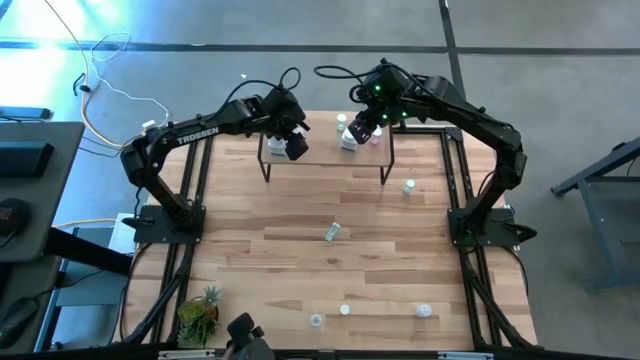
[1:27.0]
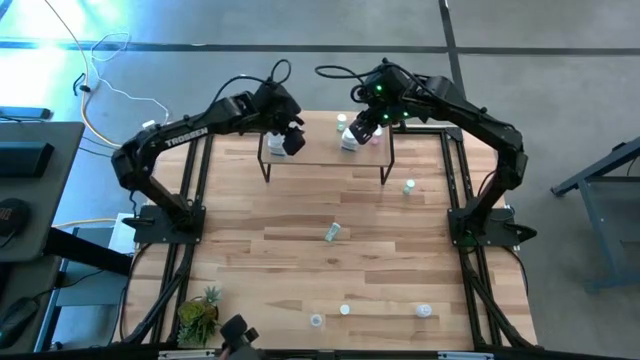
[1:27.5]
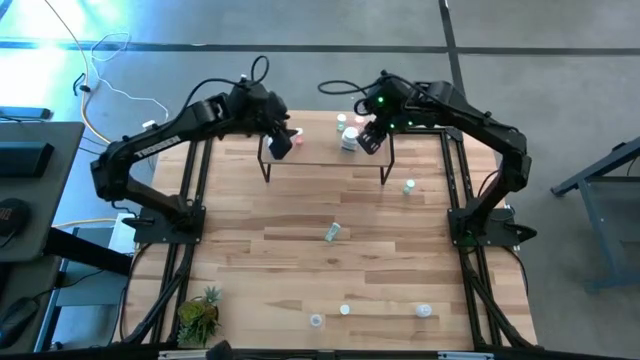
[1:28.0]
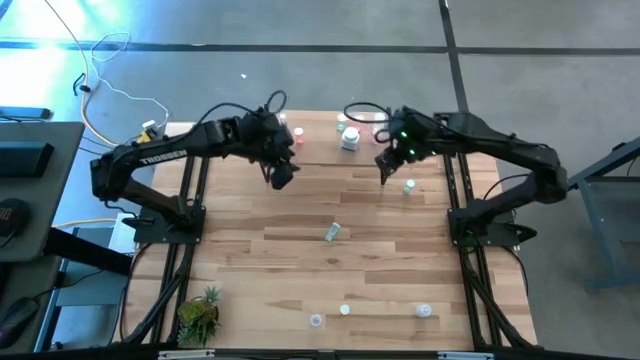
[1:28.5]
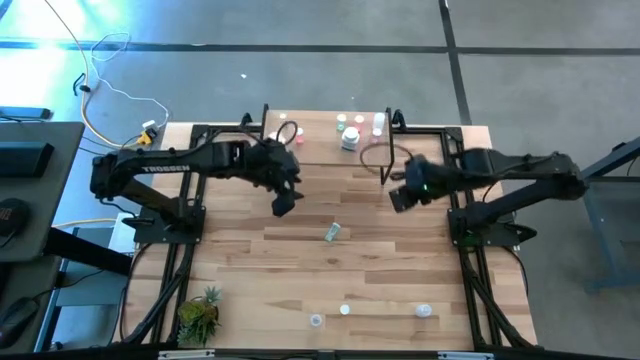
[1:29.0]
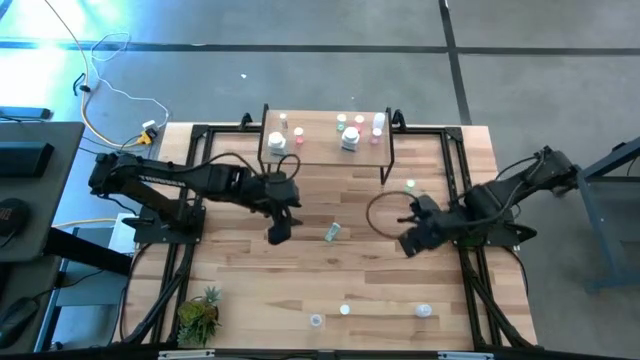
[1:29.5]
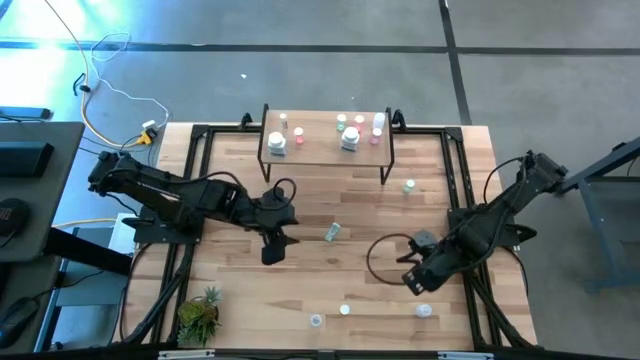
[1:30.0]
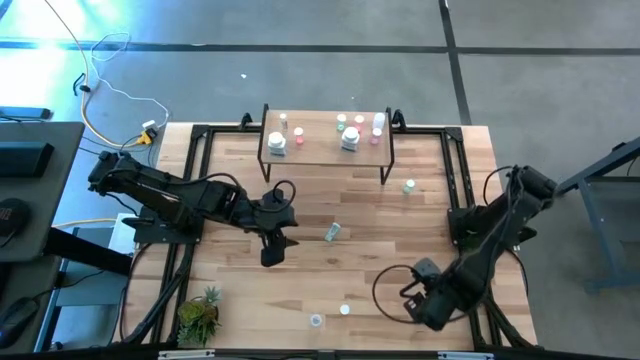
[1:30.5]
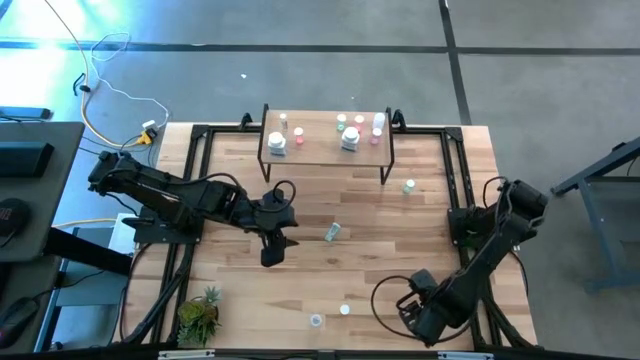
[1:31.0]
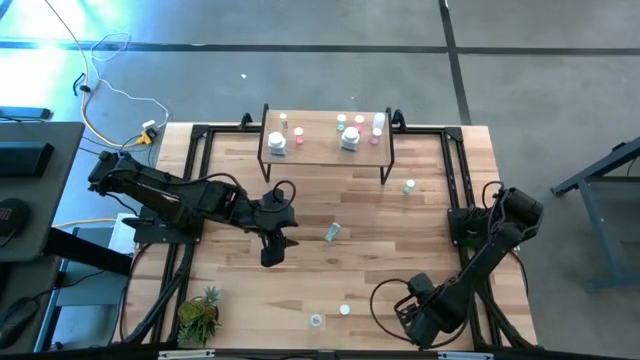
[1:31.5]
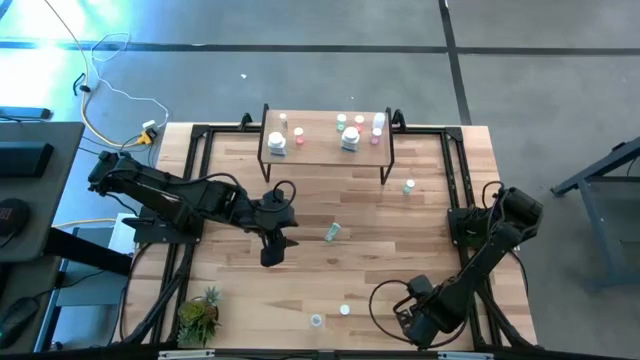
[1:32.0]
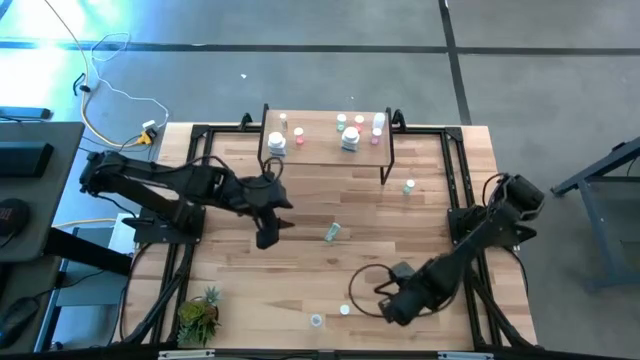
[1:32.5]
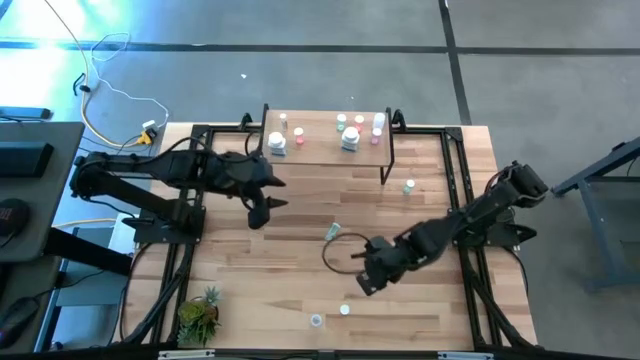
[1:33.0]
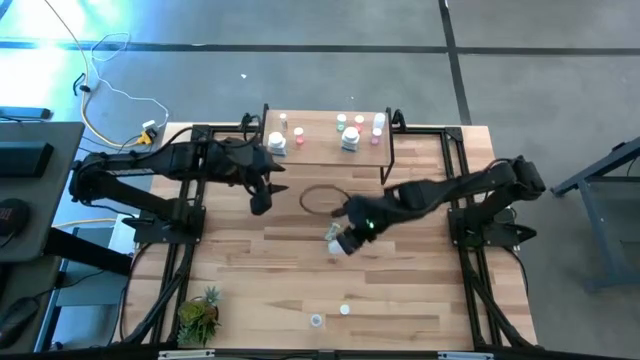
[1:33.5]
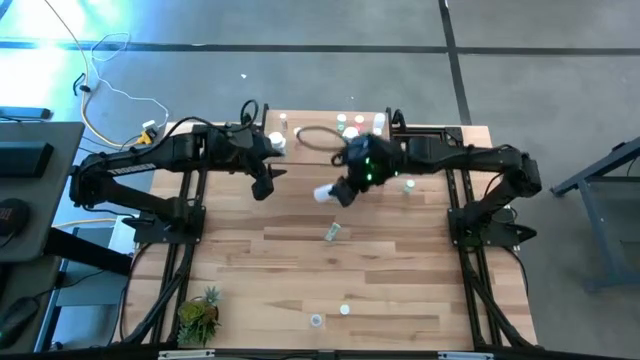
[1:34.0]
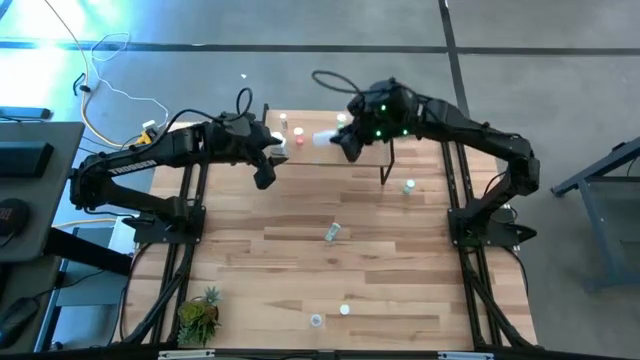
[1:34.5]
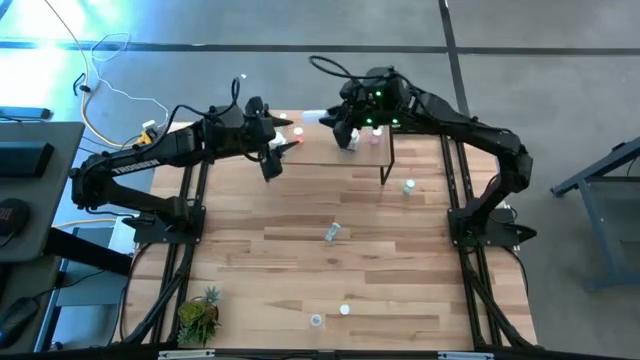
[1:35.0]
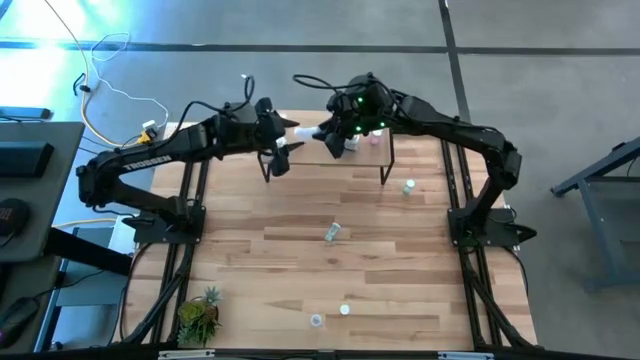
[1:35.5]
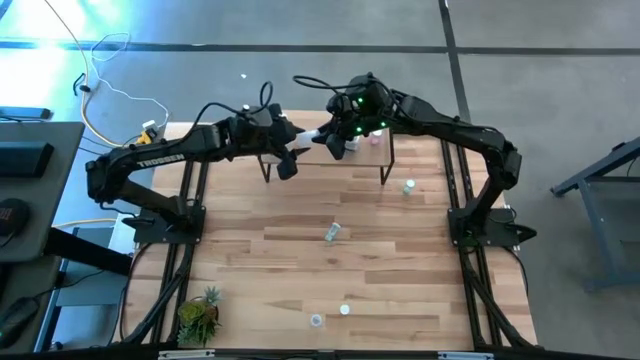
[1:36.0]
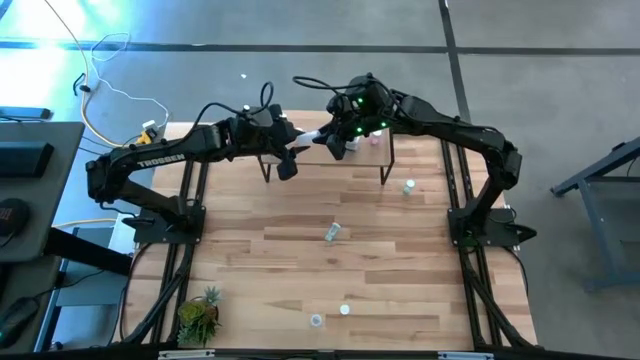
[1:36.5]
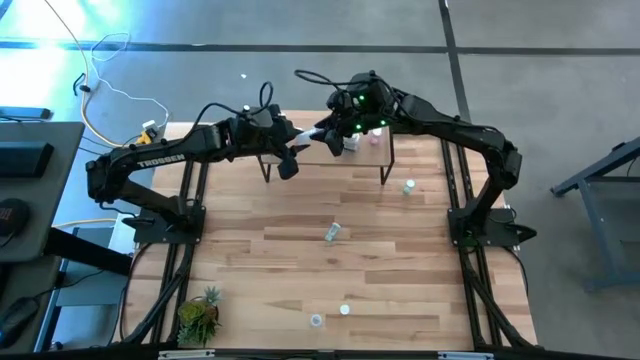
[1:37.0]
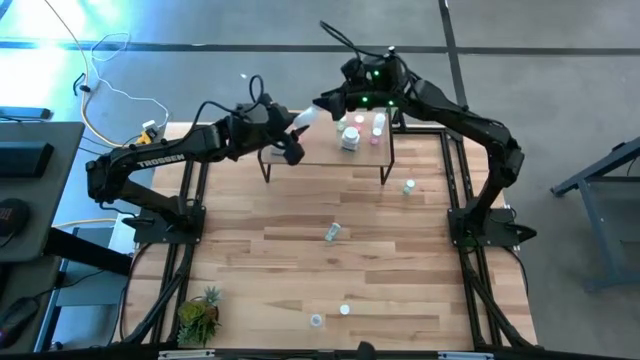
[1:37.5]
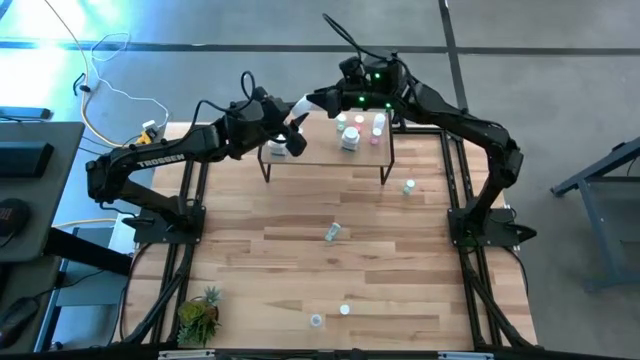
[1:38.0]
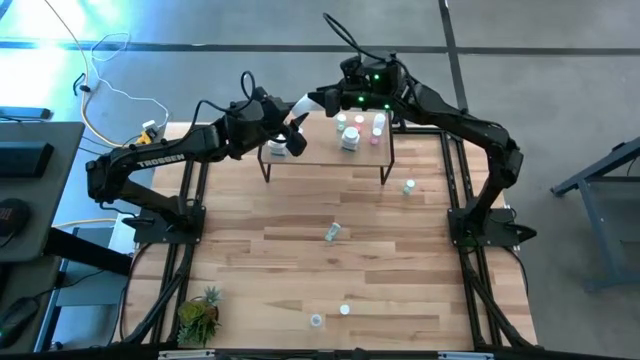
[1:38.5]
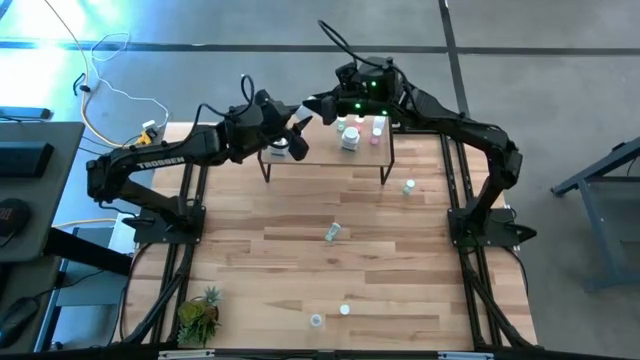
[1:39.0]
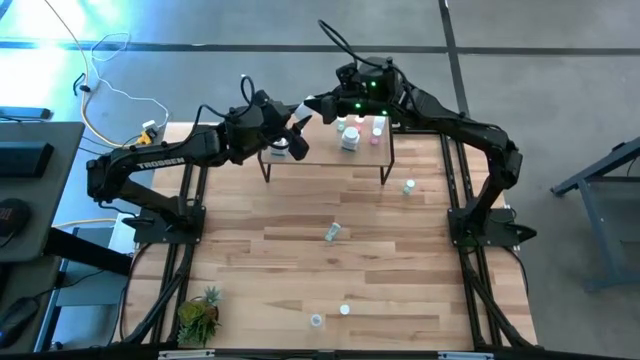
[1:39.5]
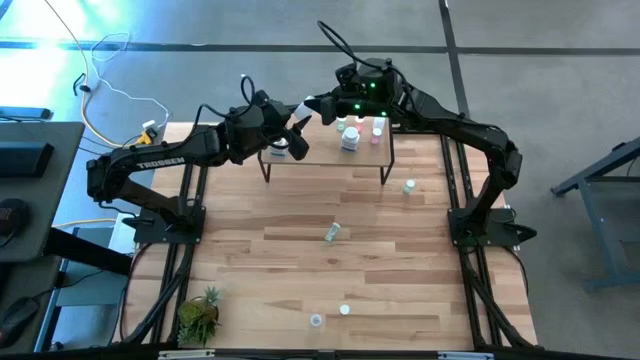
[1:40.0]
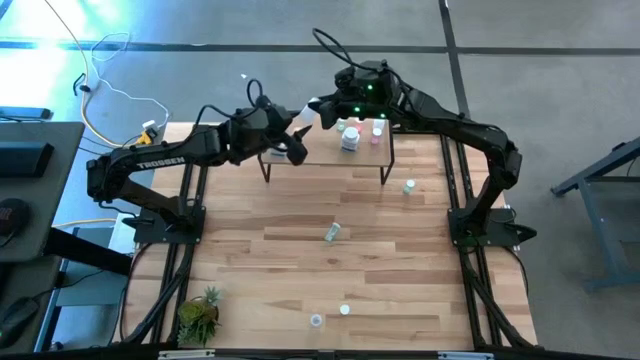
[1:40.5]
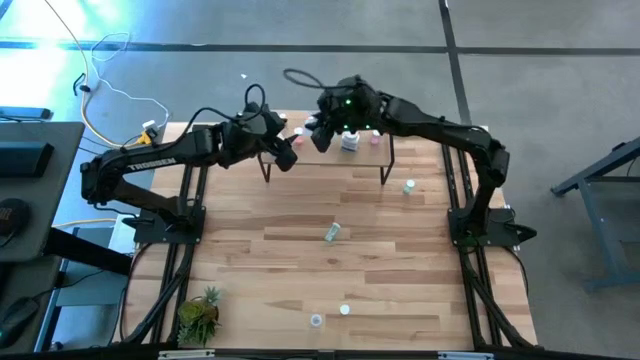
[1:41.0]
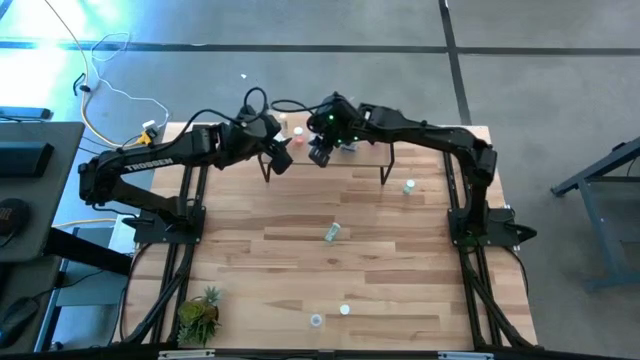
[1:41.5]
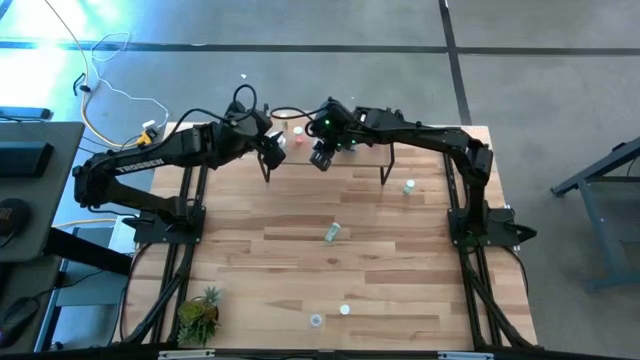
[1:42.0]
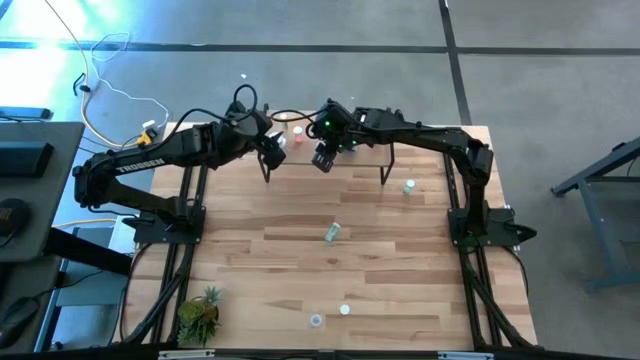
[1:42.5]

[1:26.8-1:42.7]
Task: Pick and place medicine bottles onto shelf by color
Put the right transparent pill bottle on the shelf

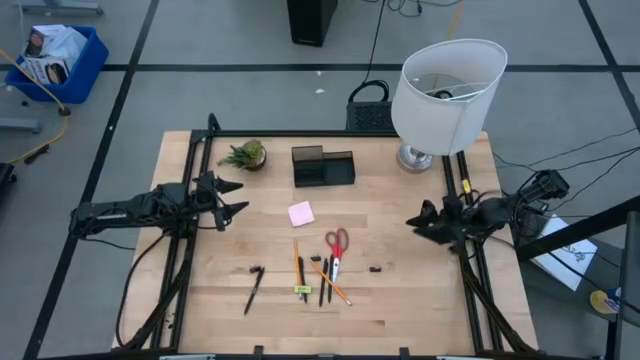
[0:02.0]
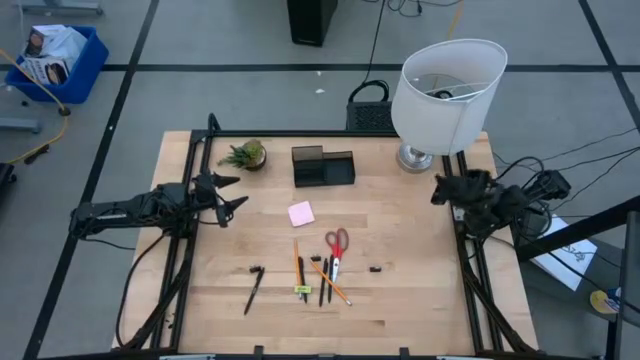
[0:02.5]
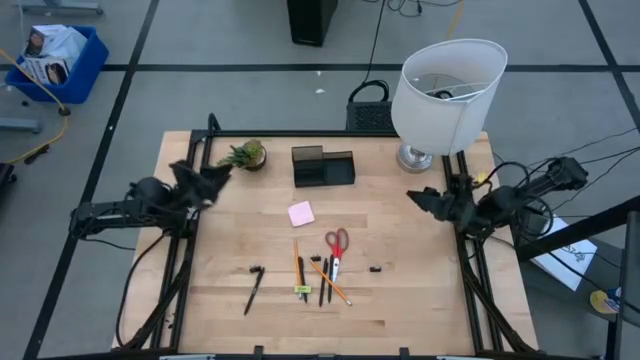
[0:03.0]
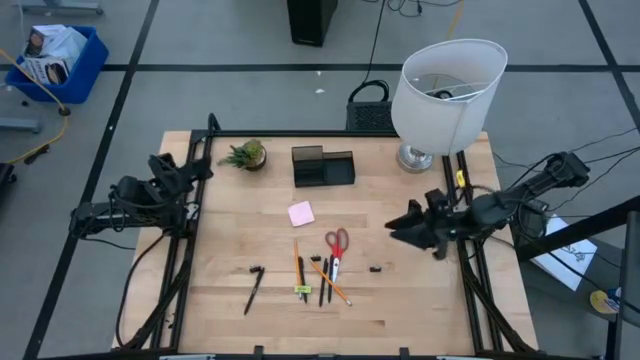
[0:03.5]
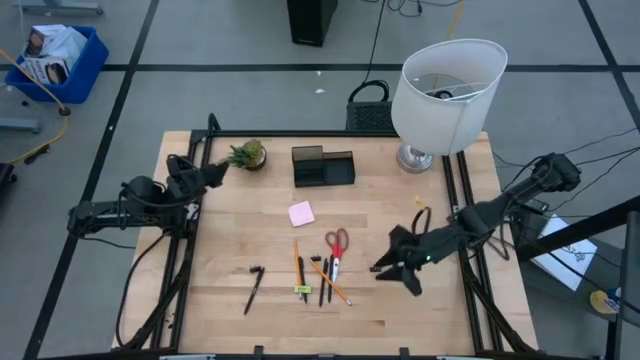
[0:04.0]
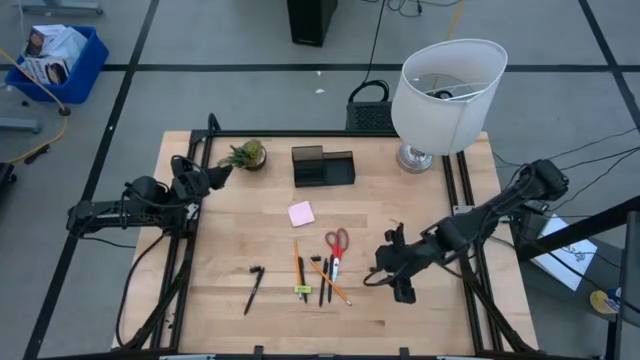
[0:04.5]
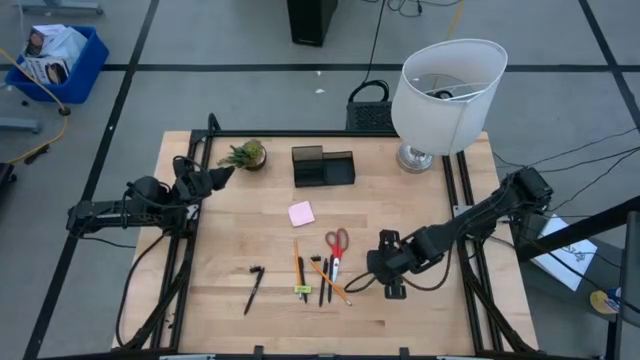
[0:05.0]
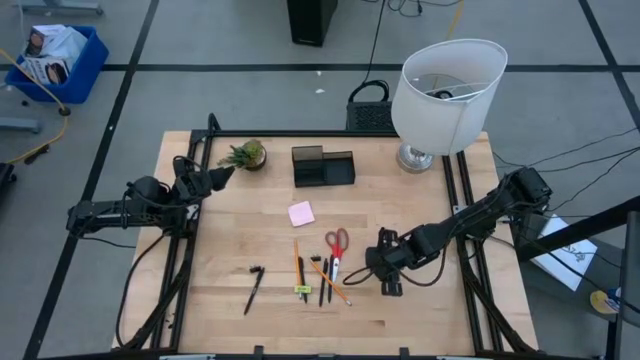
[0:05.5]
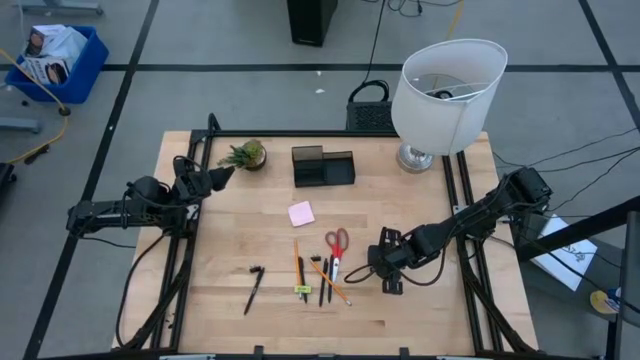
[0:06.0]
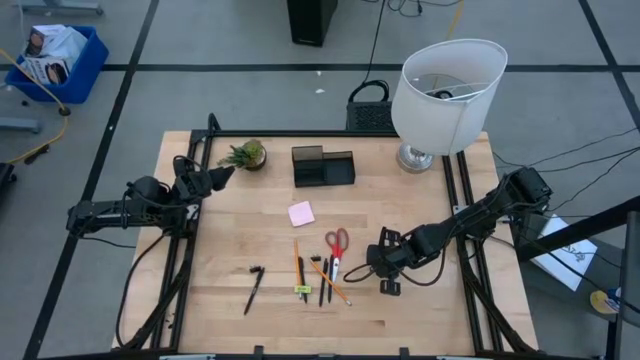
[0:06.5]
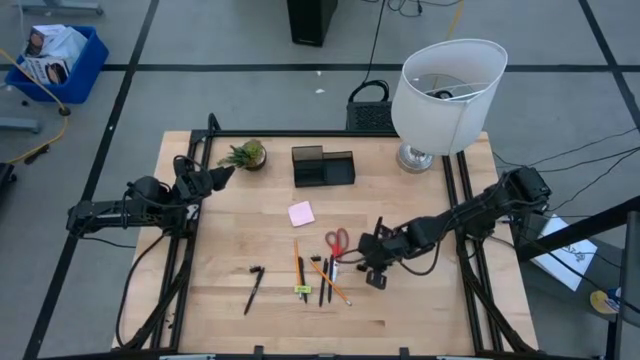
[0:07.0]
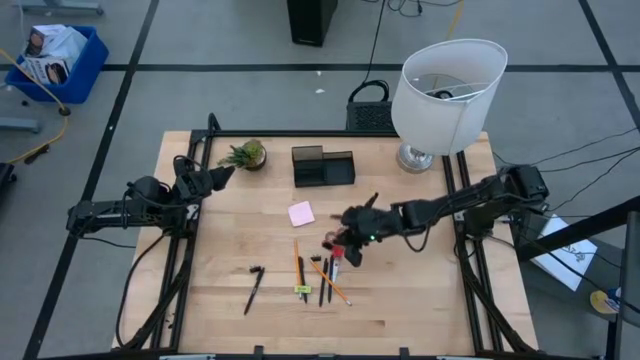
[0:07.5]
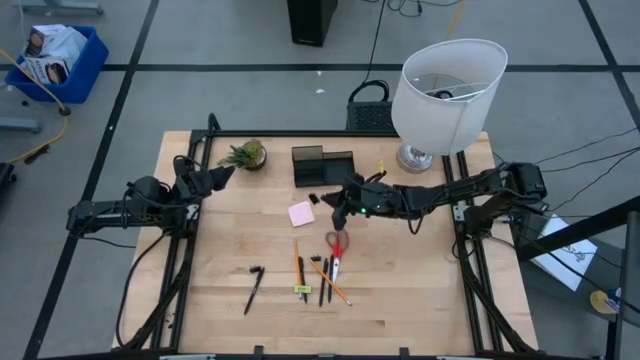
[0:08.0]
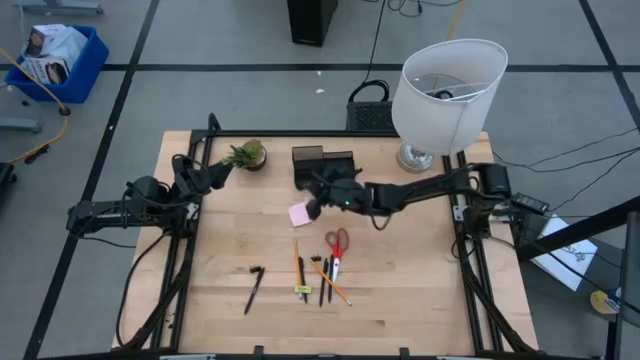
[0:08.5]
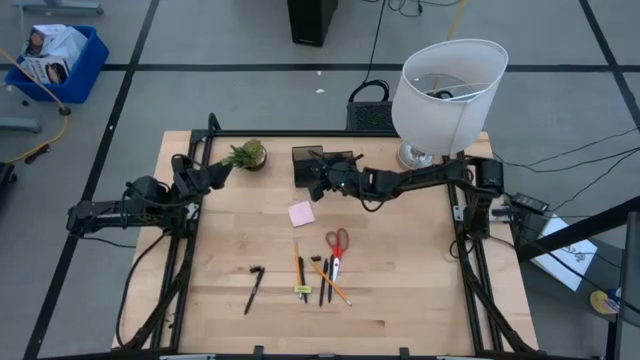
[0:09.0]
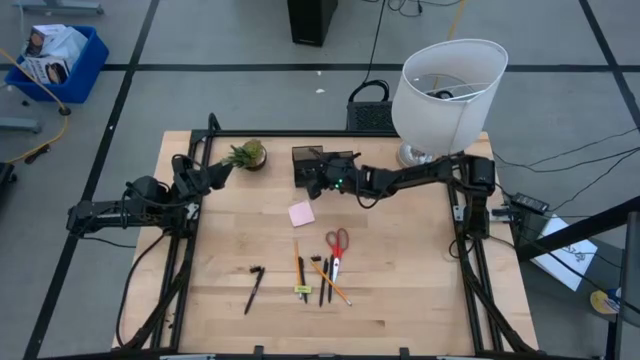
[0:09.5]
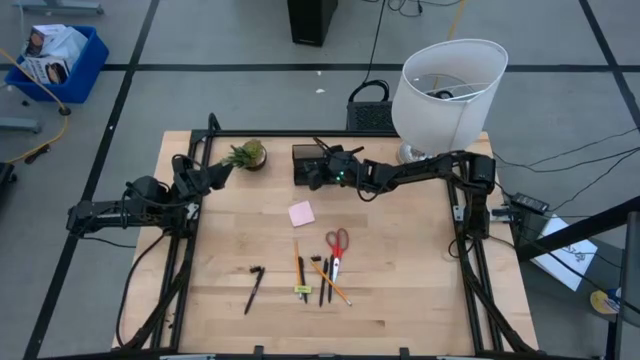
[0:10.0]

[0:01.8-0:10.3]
Task: Pick and place office supplies into organizer
Put the black binder clip into the black desk organizer
